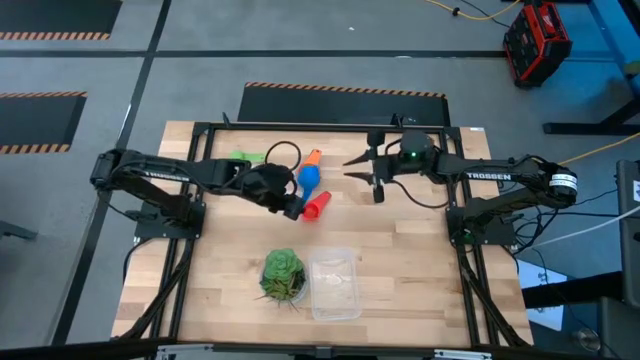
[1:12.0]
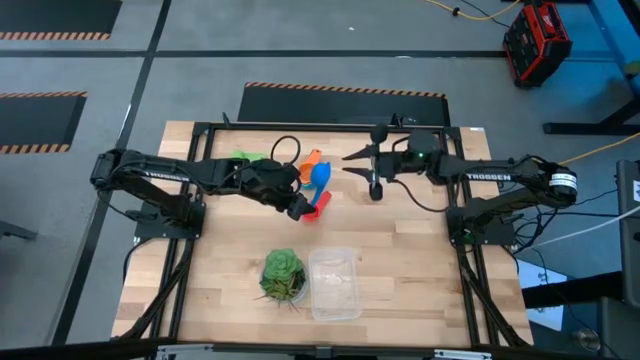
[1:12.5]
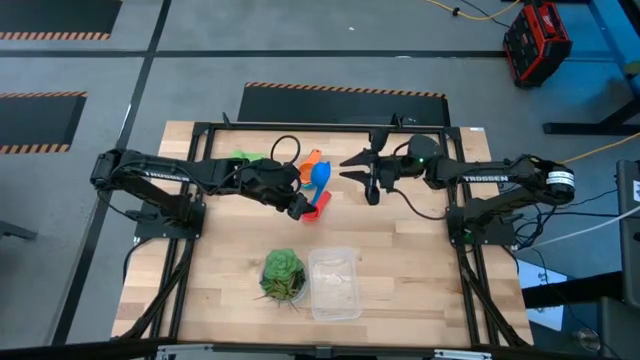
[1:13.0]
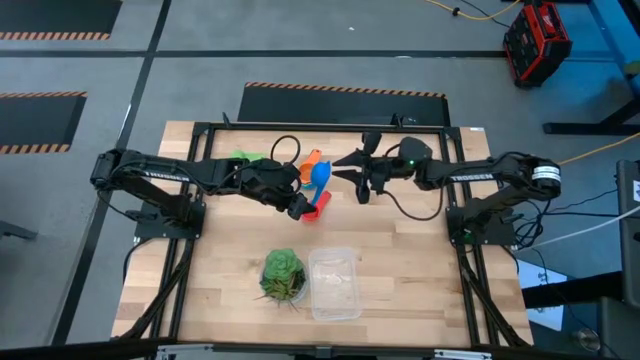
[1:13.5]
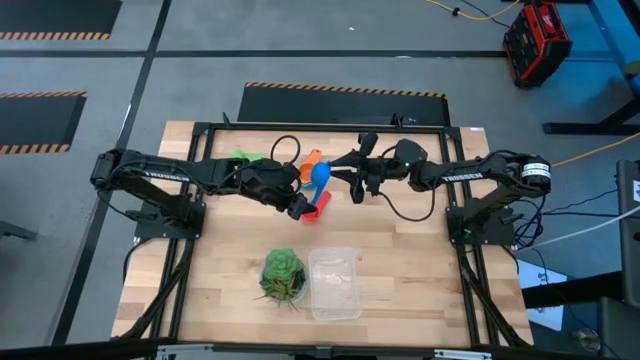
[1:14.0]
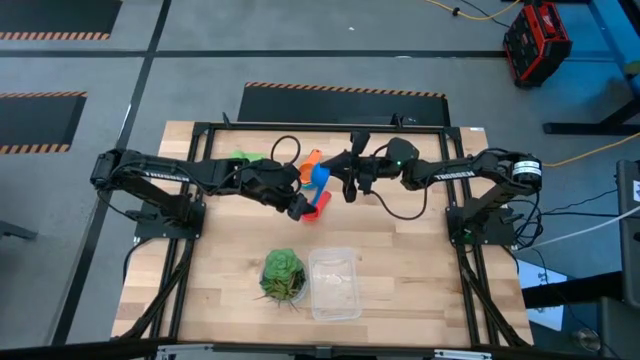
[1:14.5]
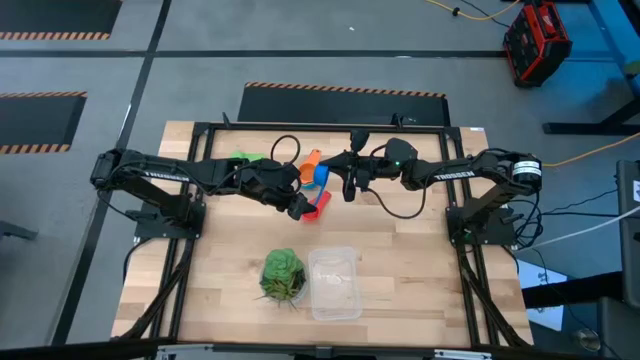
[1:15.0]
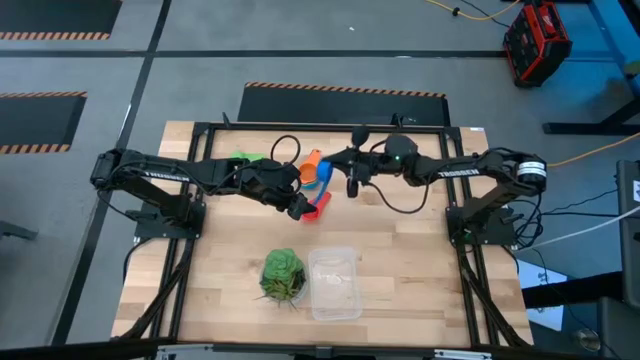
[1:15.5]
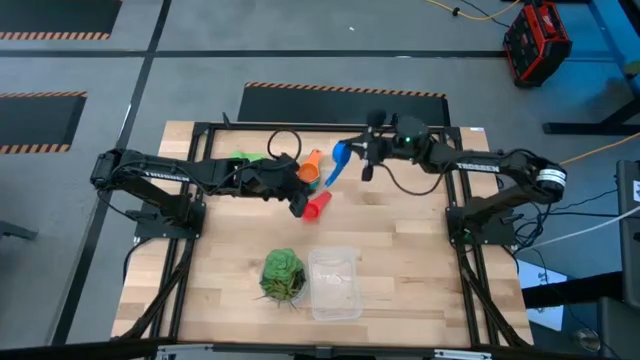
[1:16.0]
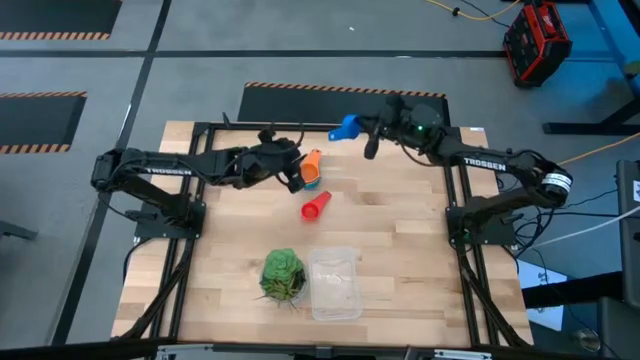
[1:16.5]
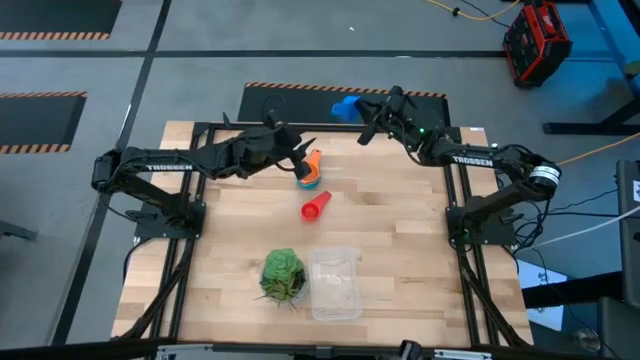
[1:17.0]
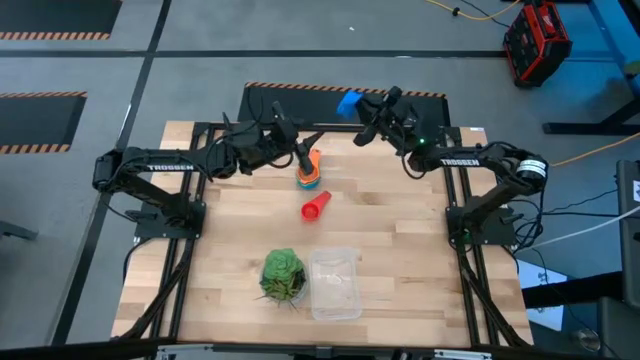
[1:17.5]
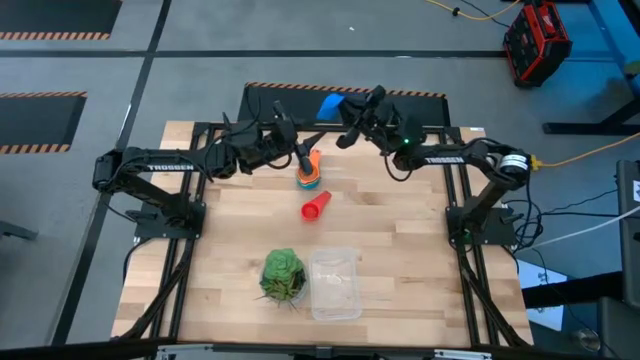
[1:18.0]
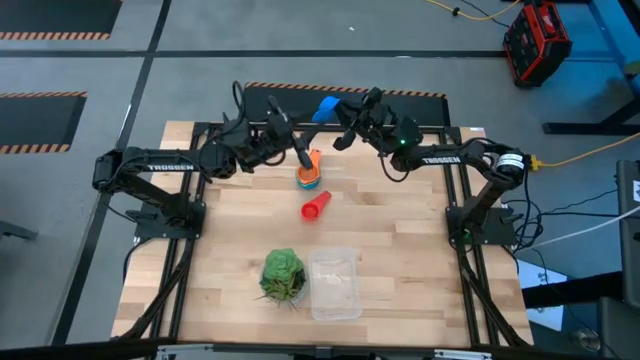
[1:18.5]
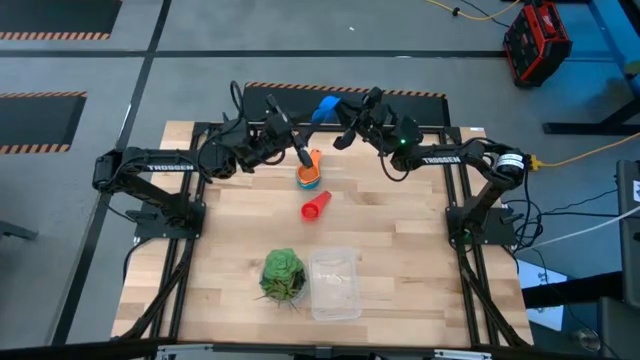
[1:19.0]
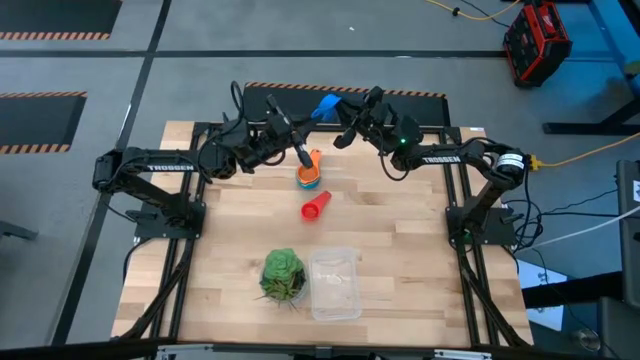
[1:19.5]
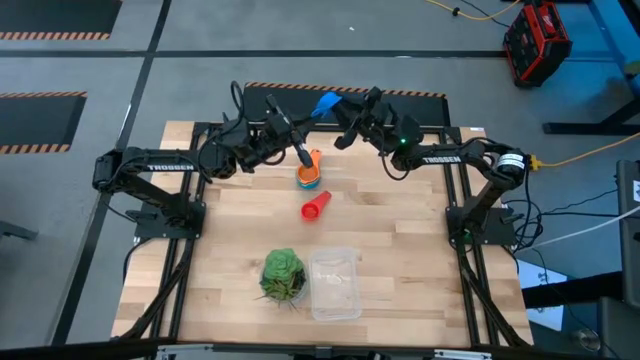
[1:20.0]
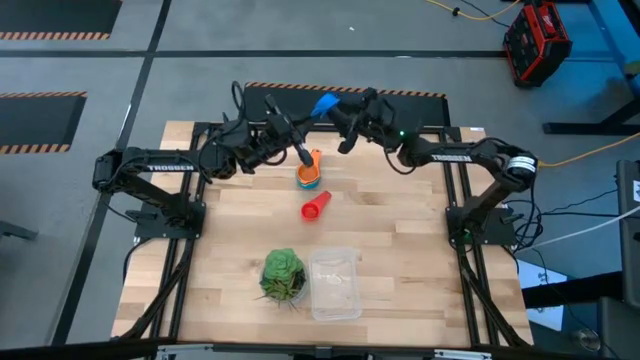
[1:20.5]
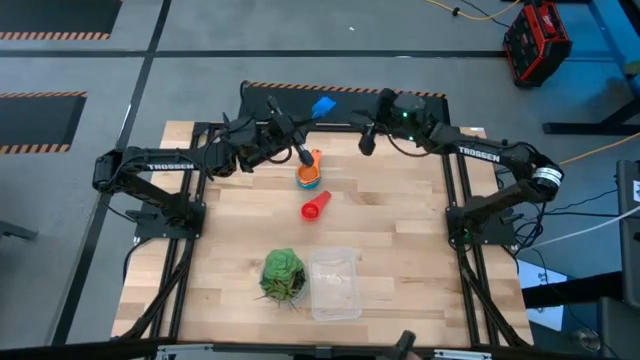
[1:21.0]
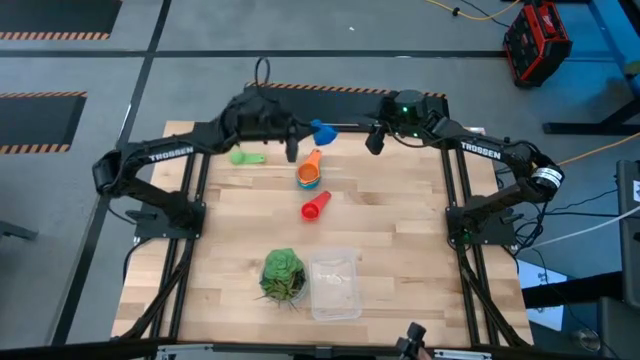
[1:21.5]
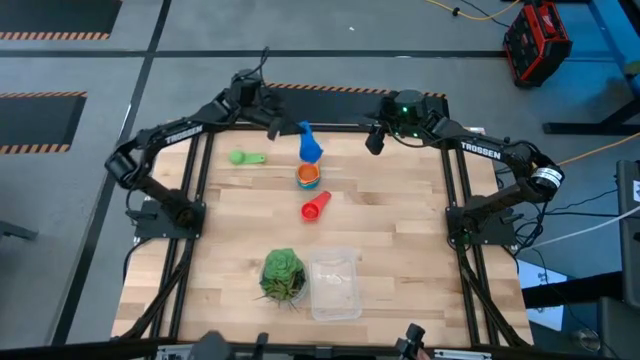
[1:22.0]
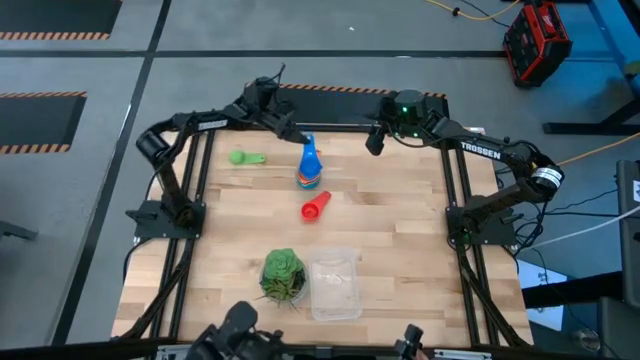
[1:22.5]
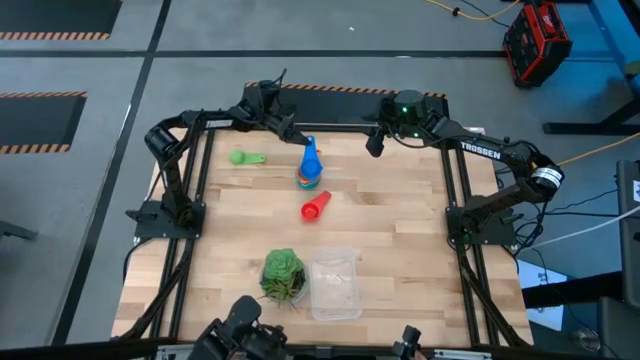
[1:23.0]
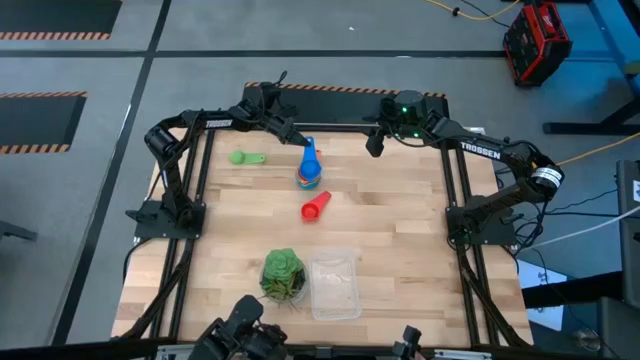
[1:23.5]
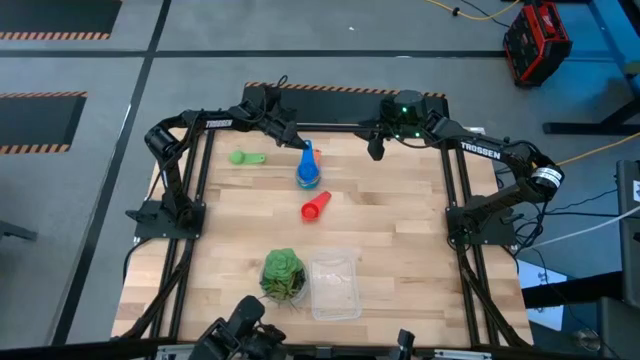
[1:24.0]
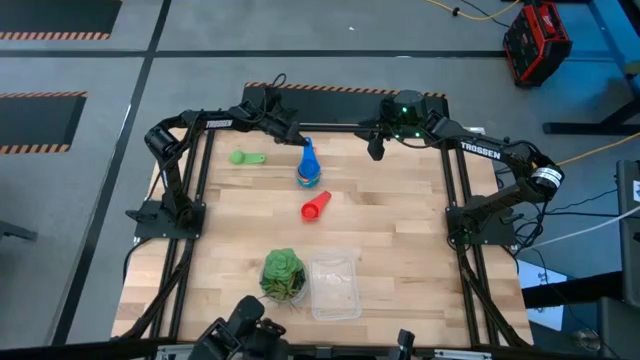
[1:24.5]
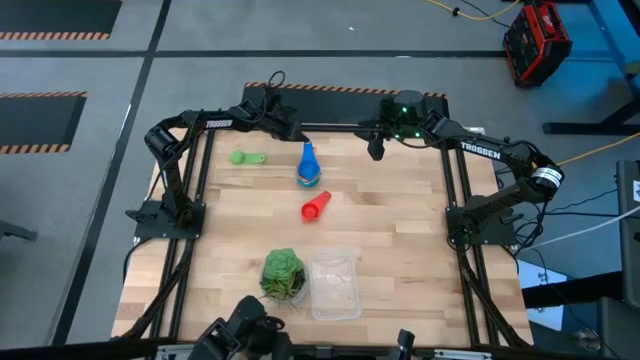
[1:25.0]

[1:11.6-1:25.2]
Task: Nest measuring cups in basket
Stack the blue measuring cup on top of the orange measuring cup
